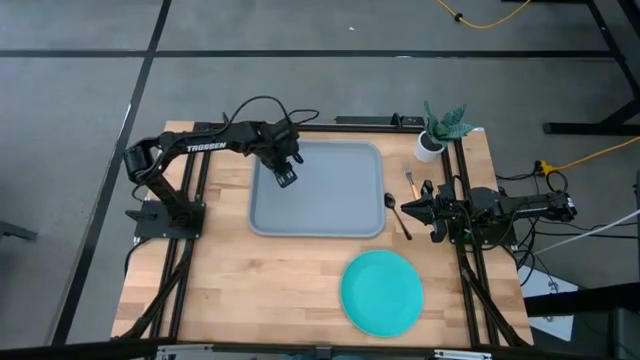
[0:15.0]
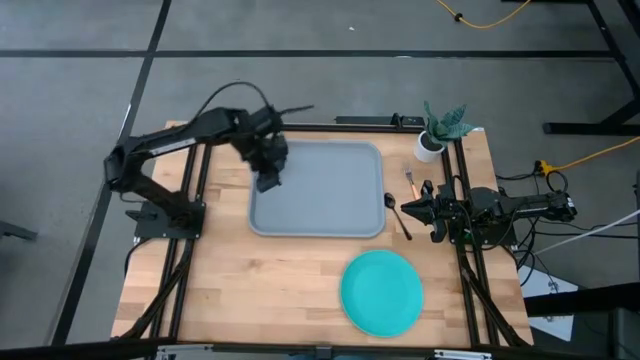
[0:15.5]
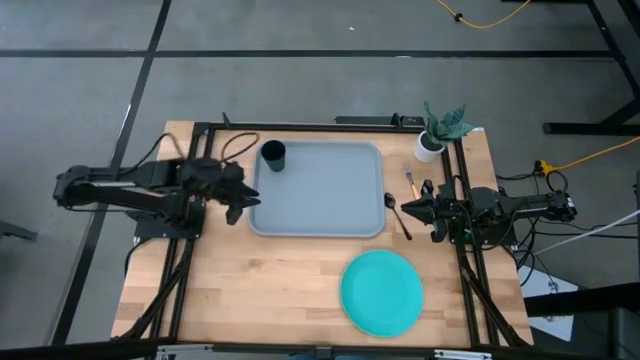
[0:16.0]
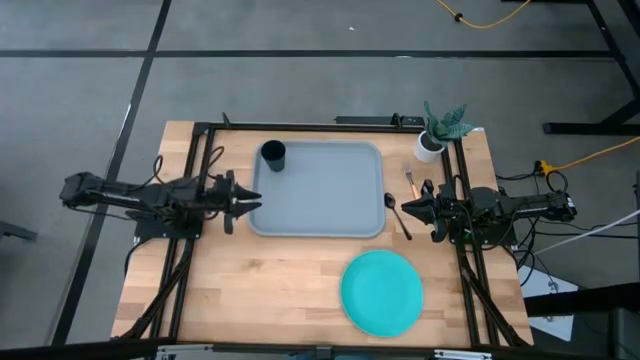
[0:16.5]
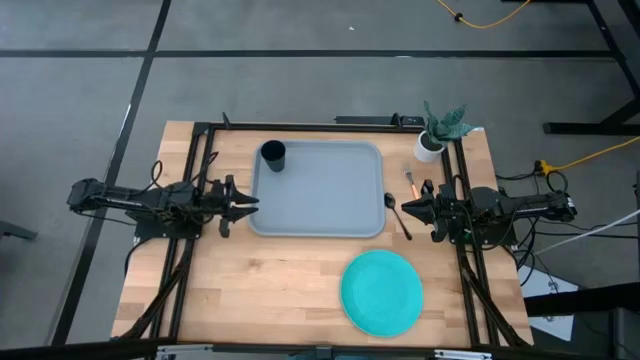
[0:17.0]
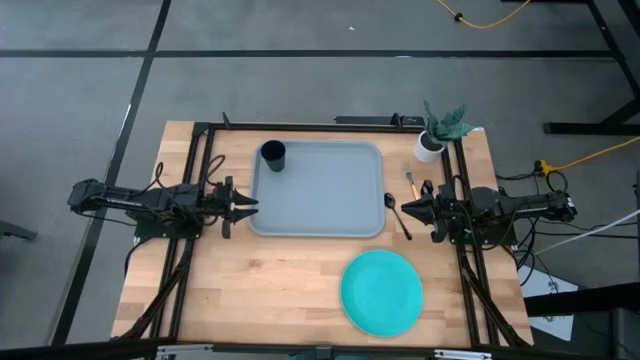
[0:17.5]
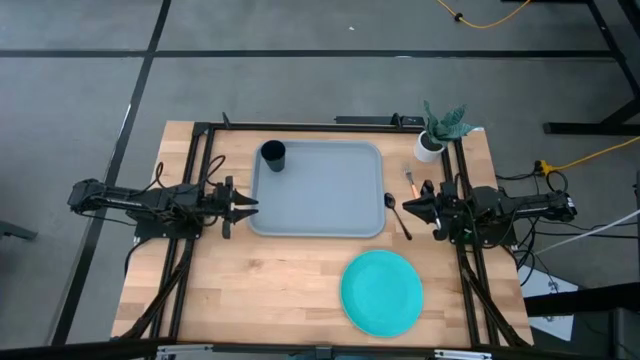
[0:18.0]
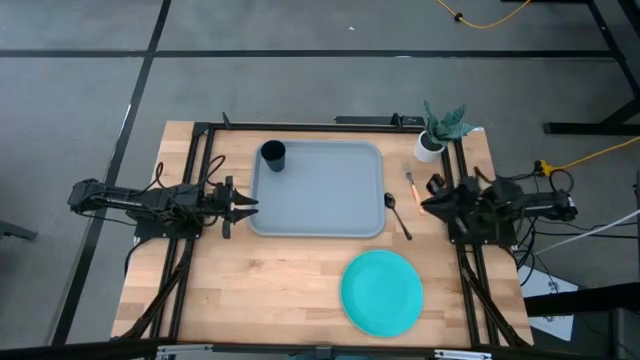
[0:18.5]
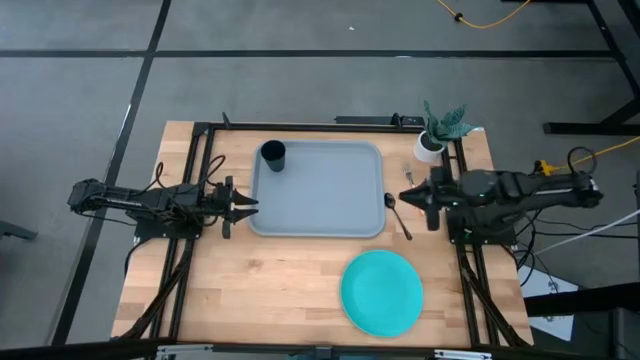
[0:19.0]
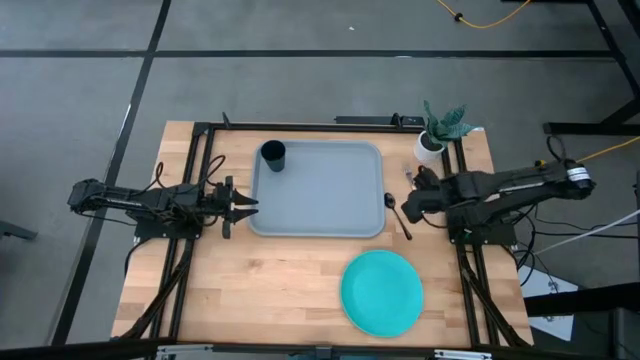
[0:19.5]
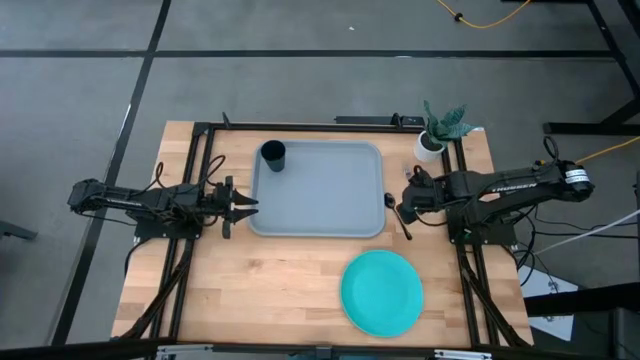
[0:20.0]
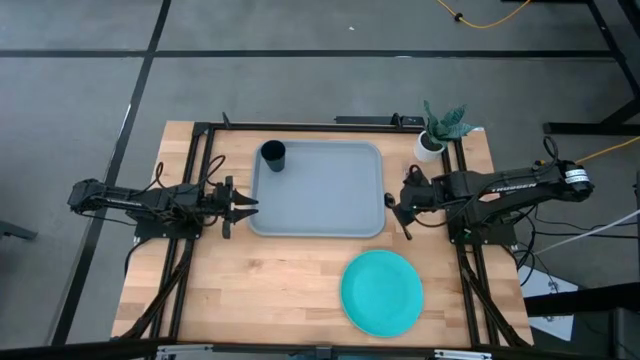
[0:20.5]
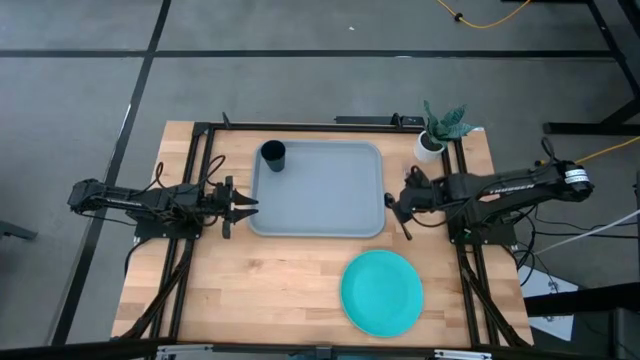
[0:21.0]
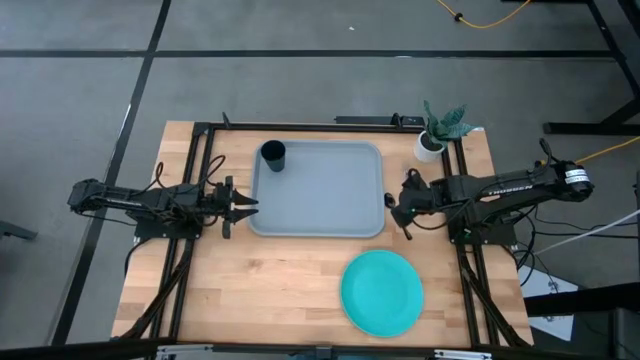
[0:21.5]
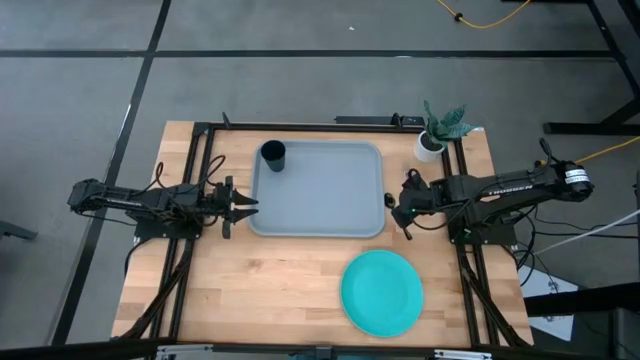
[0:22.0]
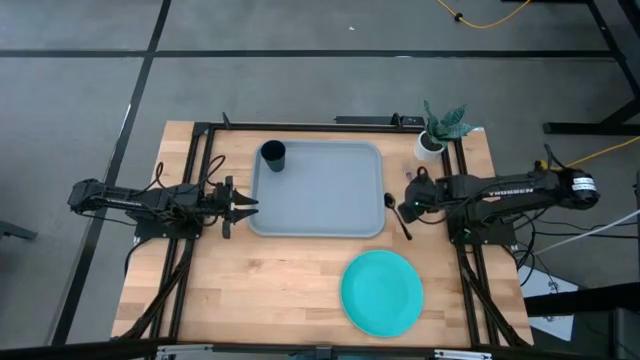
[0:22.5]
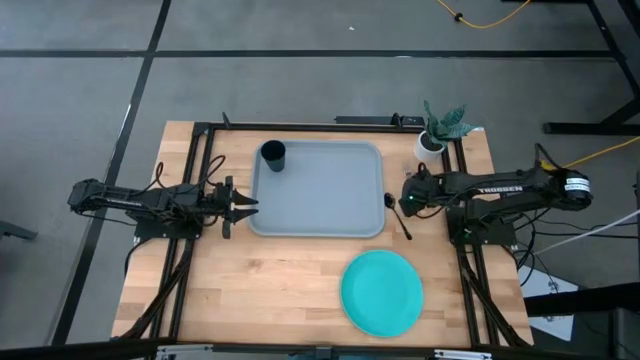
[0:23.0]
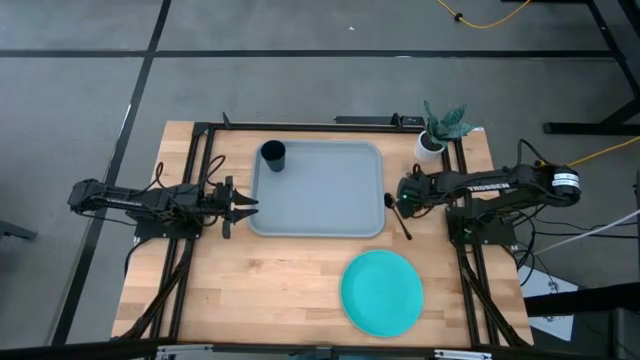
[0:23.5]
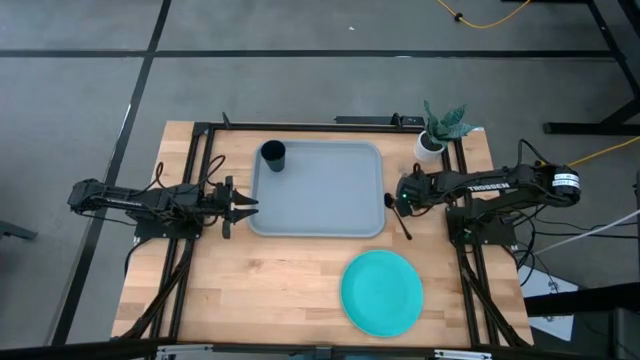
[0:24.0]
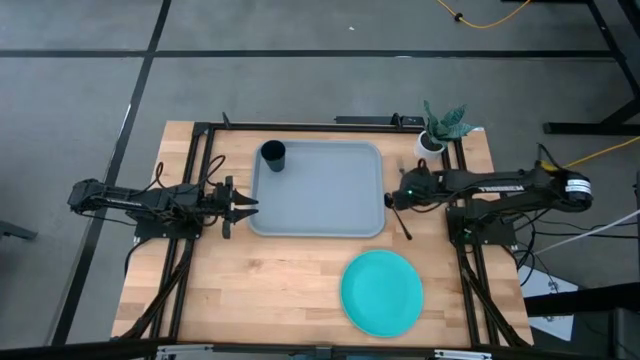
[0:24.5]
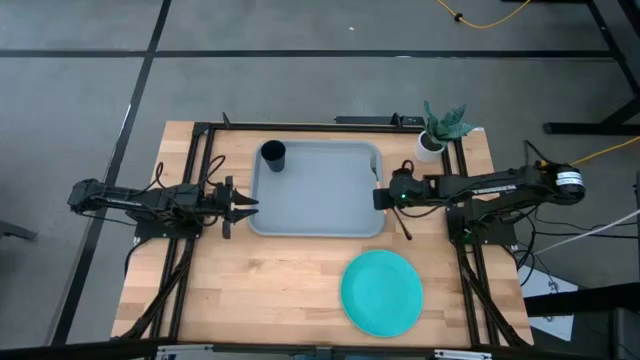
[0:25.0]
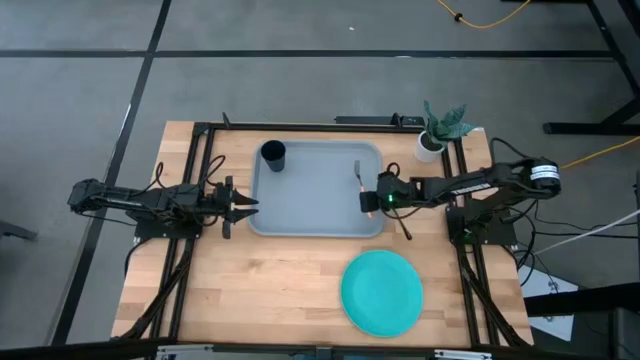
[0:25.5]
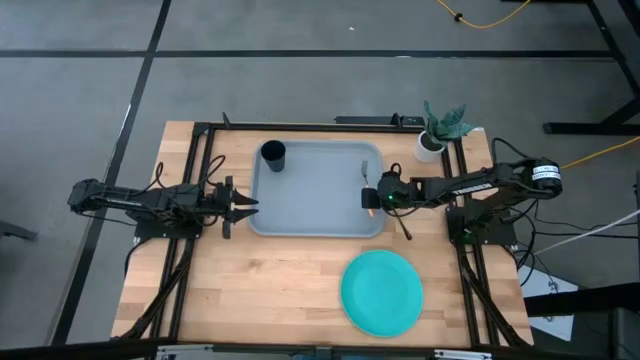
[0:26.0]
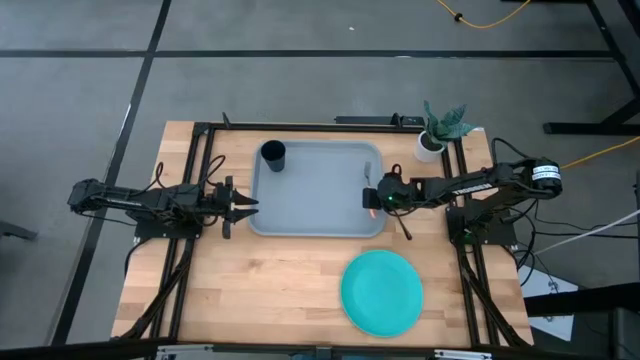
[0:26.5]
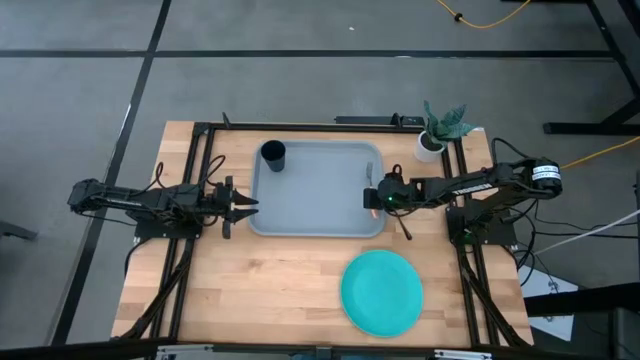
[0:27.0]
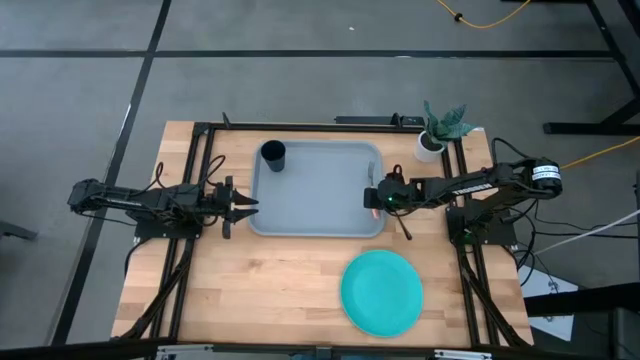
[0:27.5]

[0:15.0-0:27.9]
Task: Pick and place plate/cup/fork/spoon on tray
Put the orange fork to the right of of the serving tray

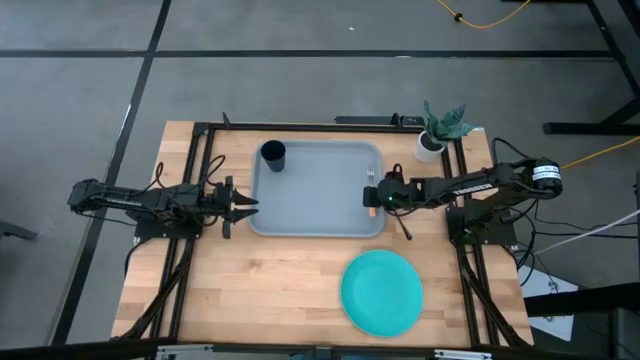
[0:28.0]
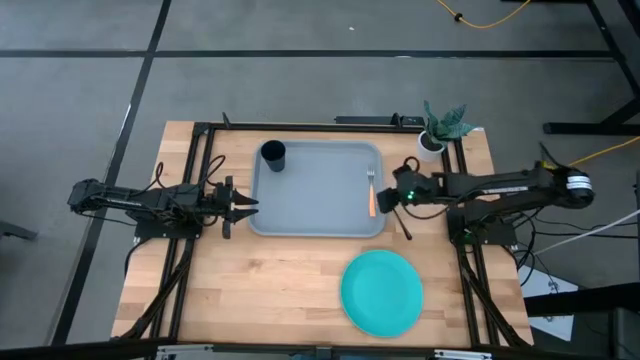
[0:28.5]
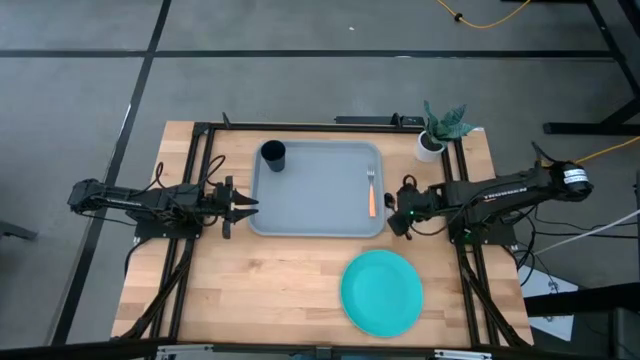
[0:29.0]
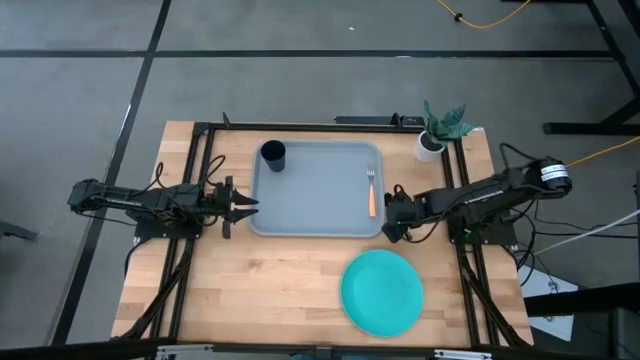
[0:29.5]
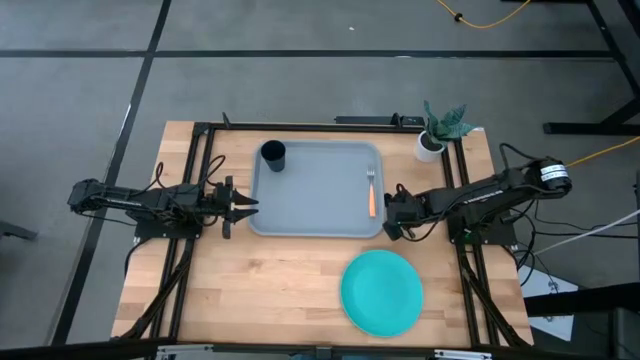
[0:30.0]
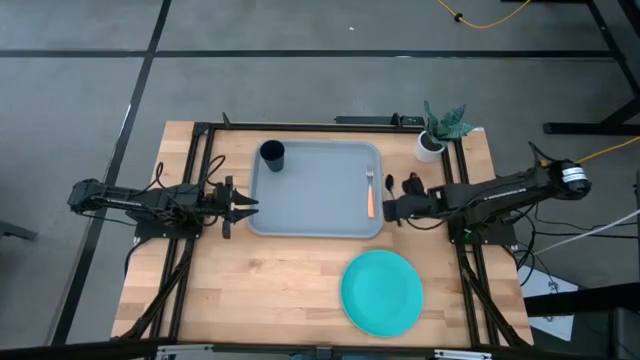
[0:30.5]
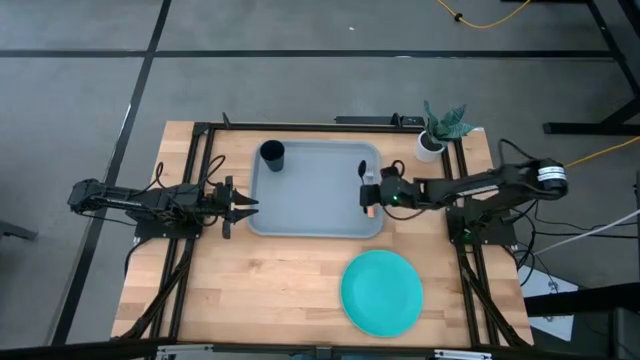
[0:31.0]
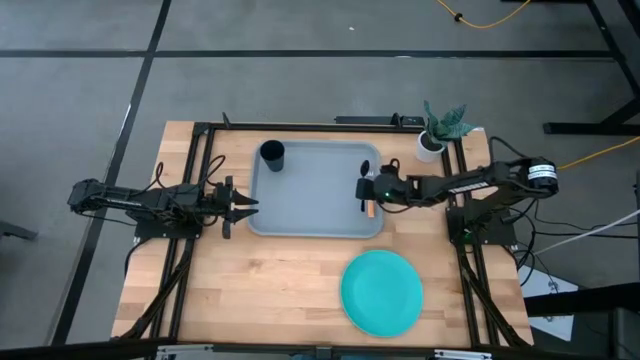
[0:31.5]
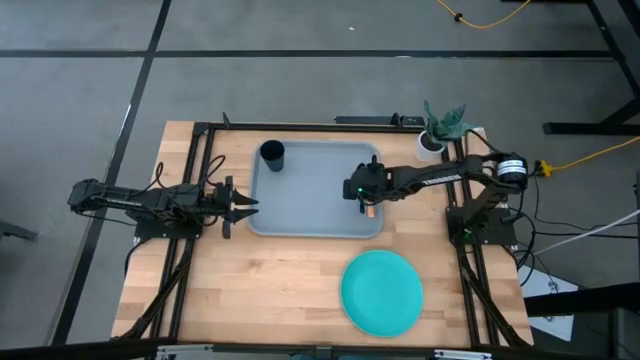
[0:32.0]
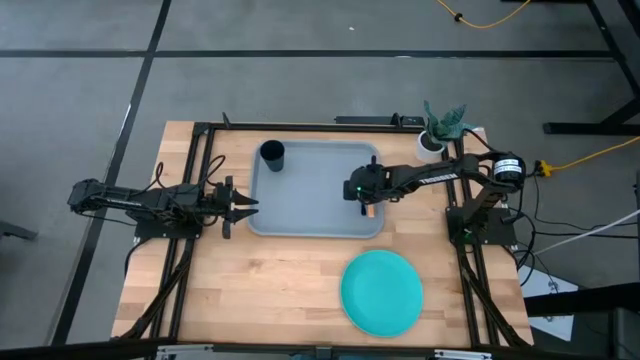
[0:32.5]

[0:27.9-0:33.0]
Put the black spoon on the serving tray to the left of the orange fork

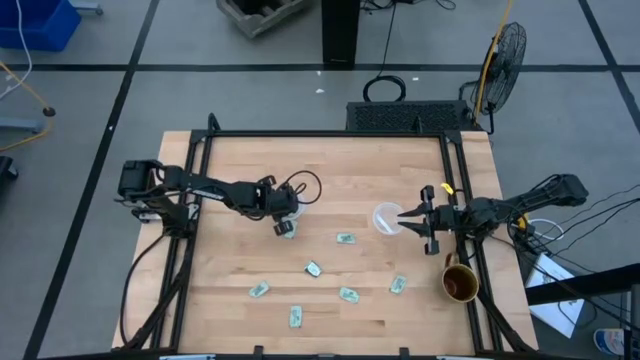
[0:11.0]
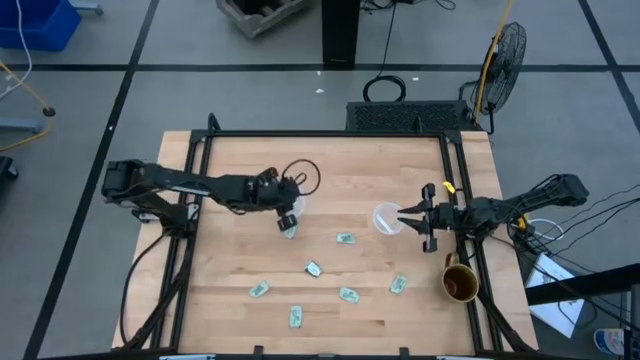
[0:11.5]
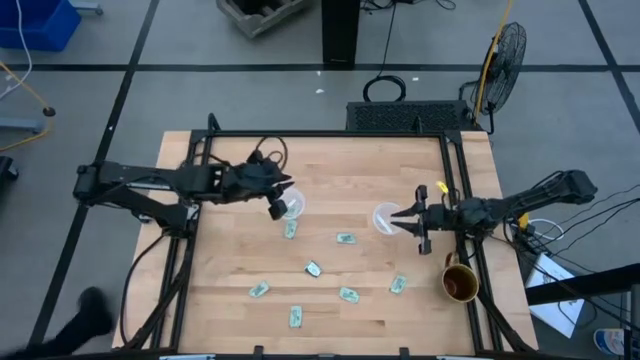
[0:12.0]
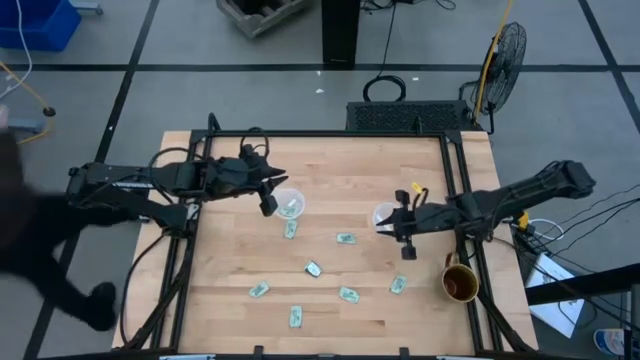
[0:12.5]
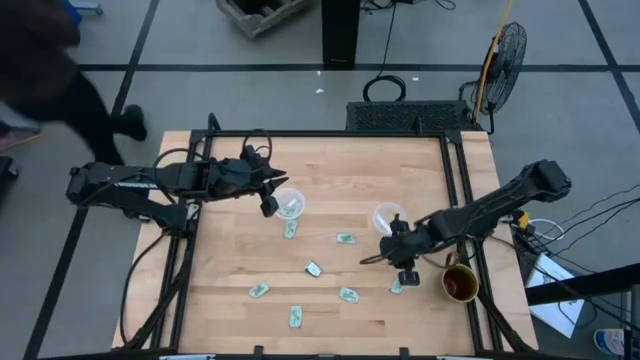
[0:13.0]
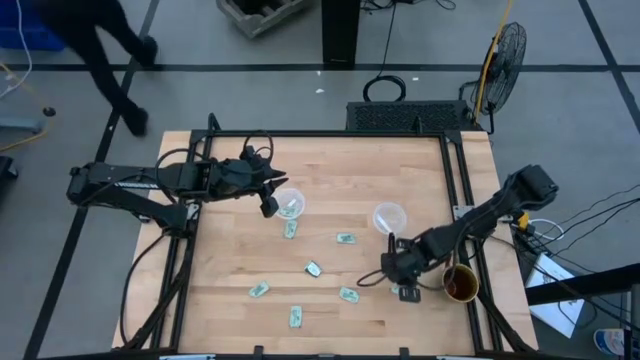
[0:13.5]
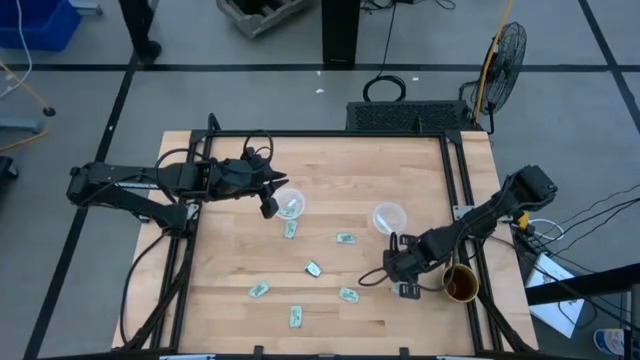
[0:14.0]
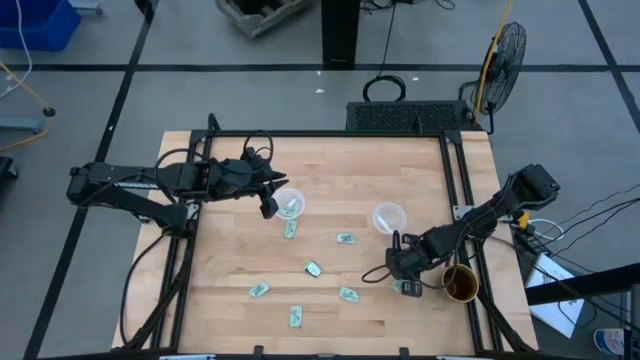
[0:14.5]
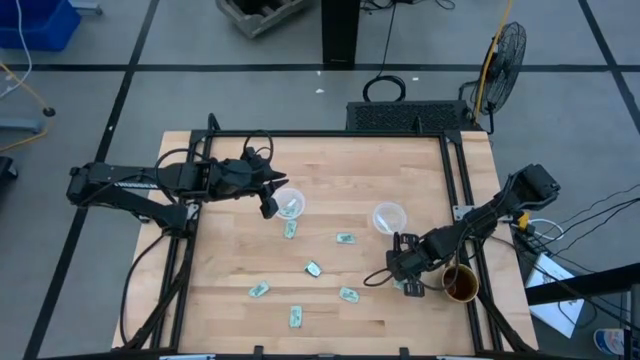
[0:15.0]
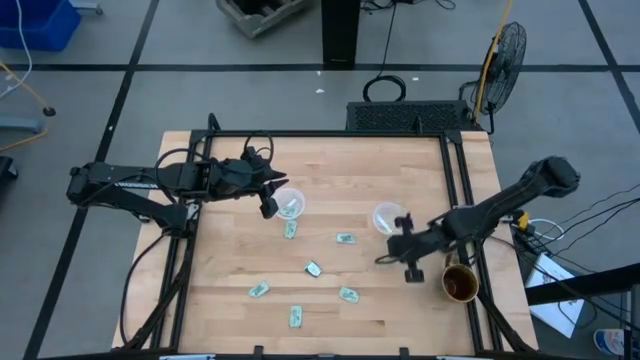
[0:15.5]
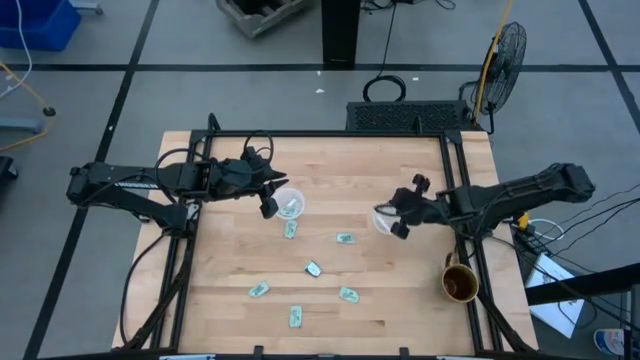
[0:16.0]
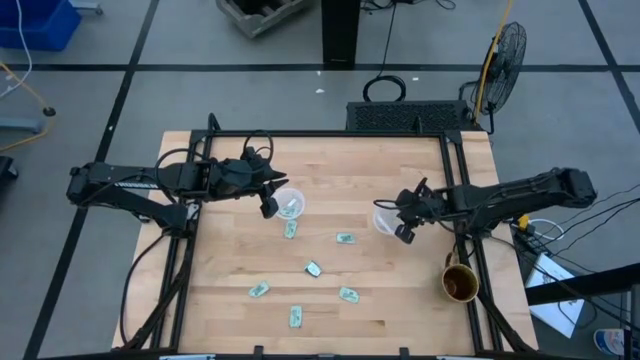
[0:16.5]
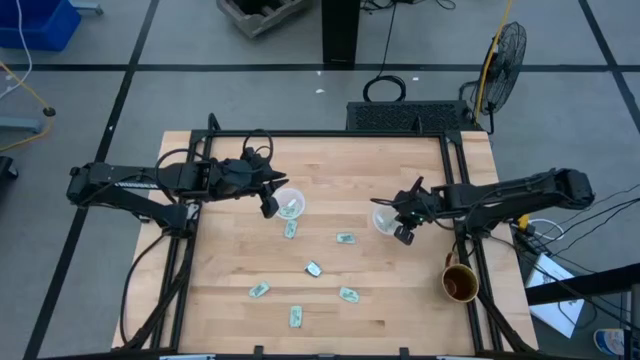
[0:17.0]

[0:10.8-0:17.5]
Task: Pick and place Stevia / Truvia into bins
Put the stevia packet into the right container
